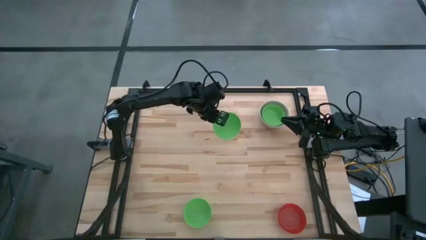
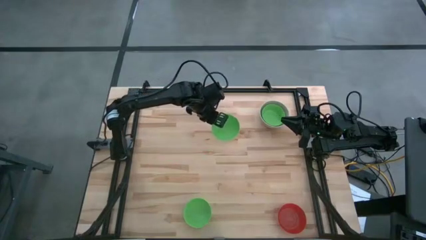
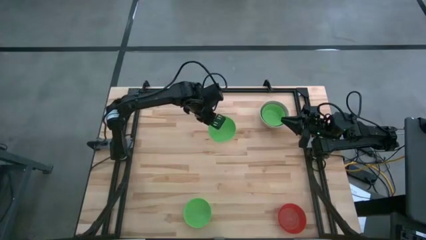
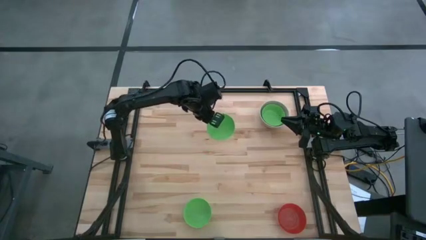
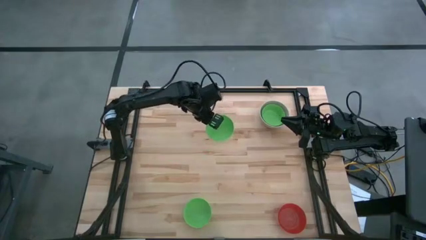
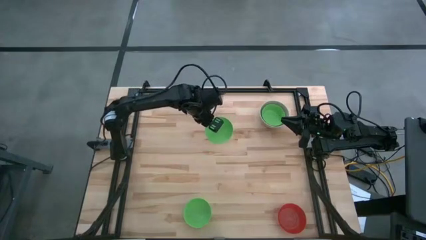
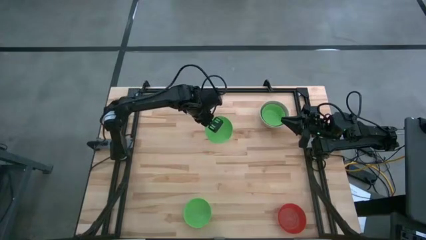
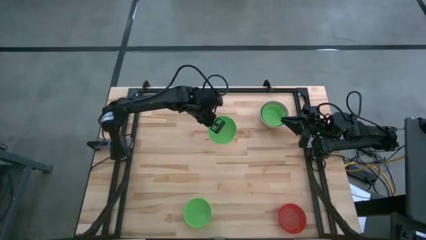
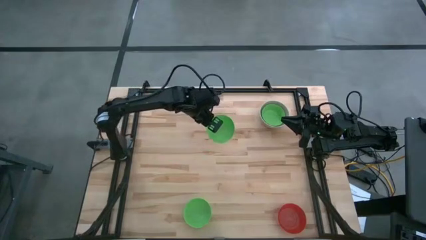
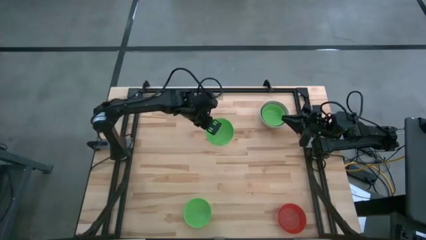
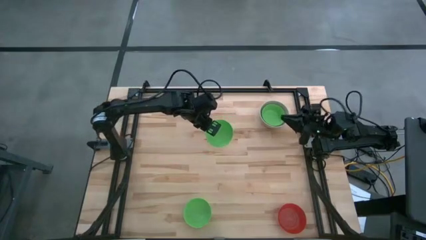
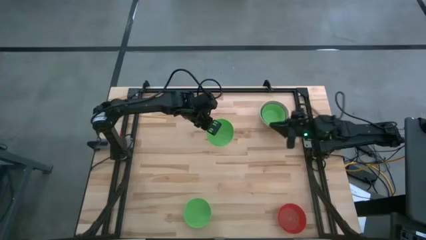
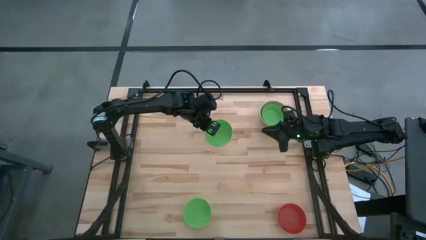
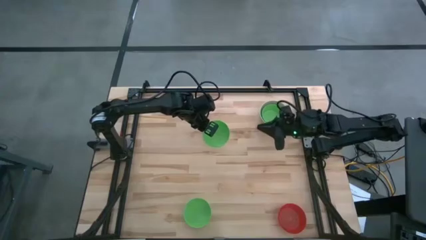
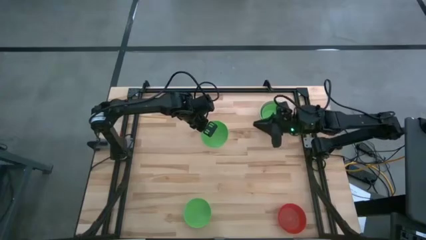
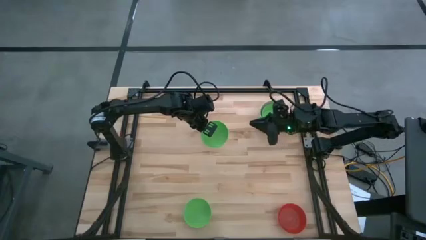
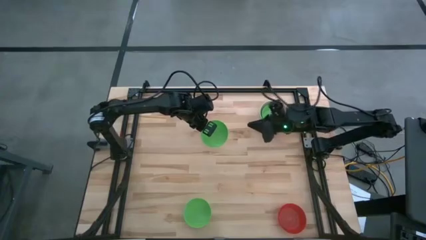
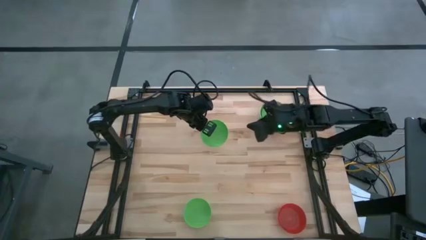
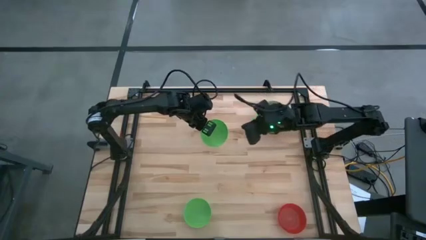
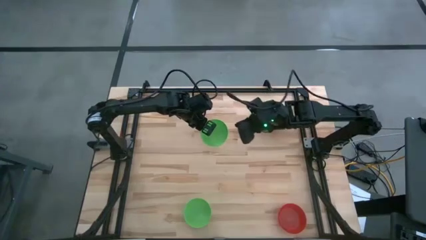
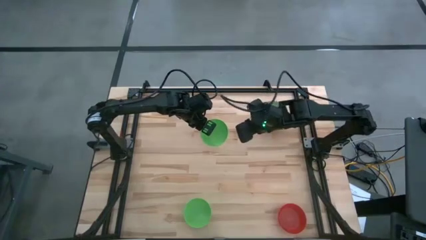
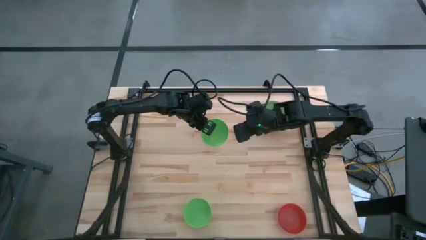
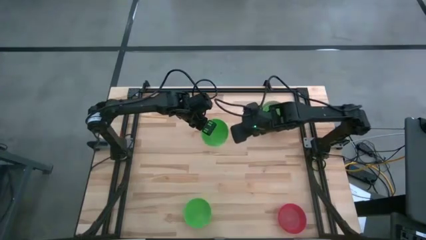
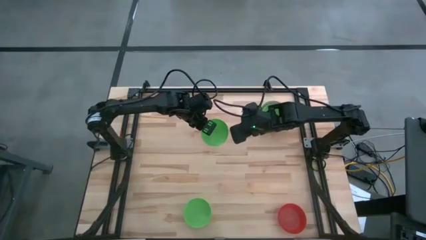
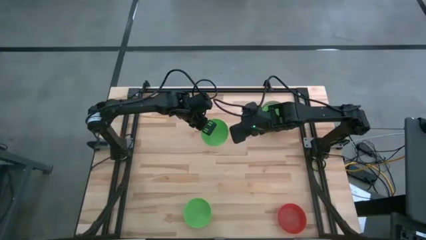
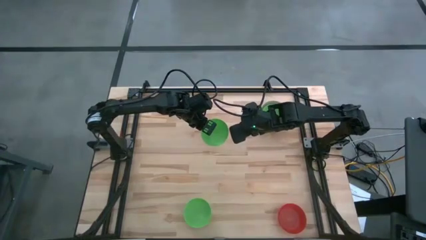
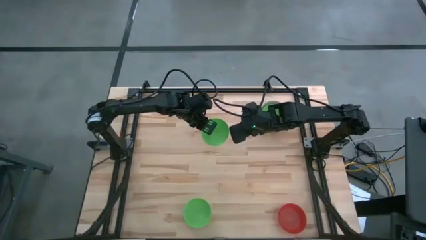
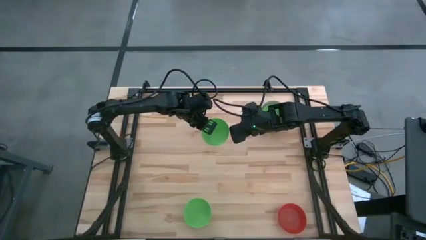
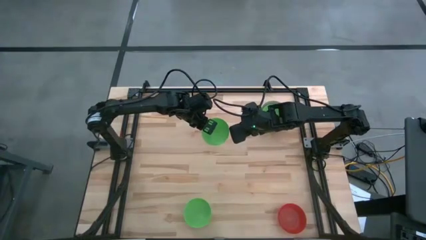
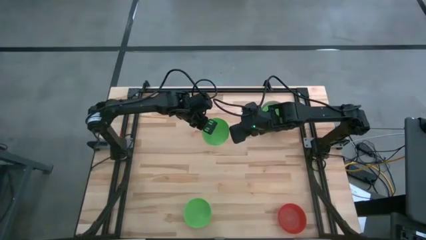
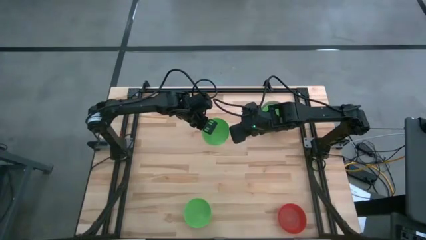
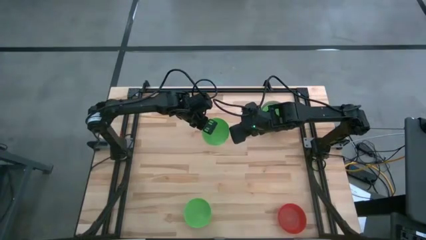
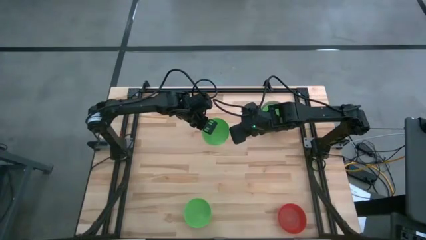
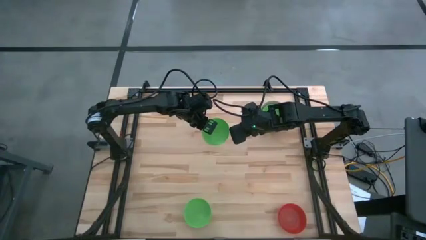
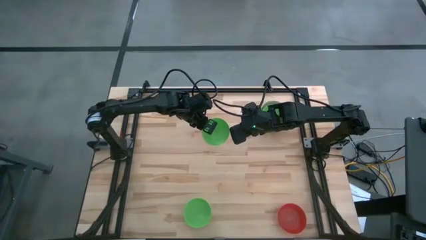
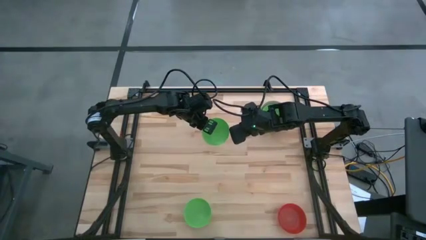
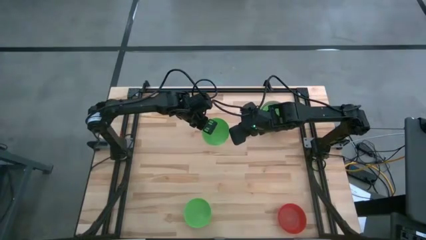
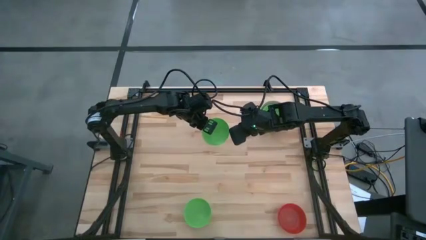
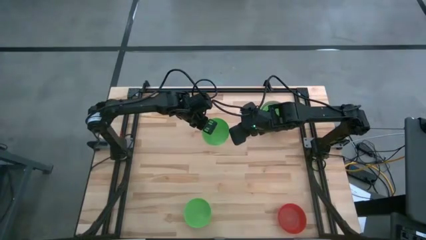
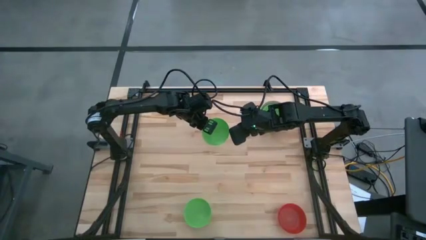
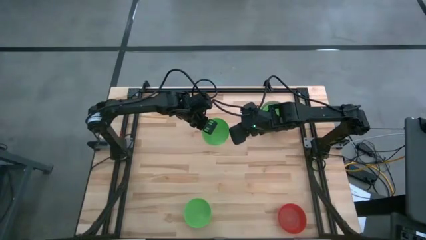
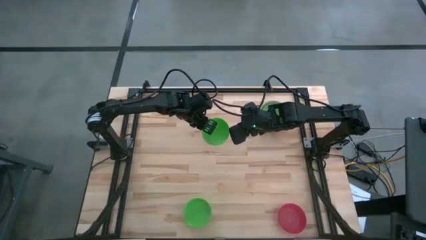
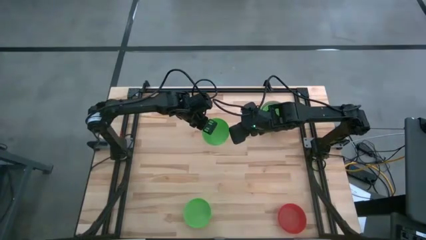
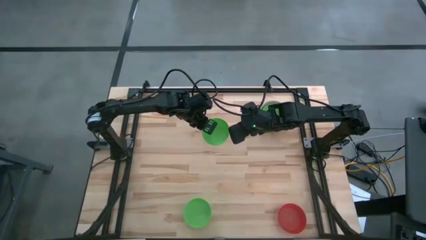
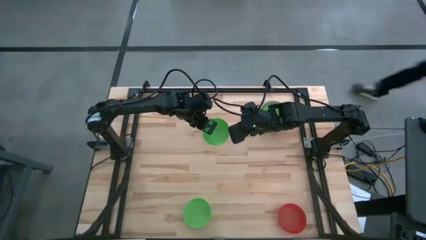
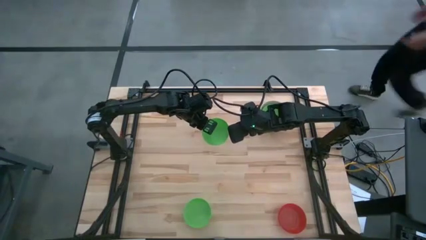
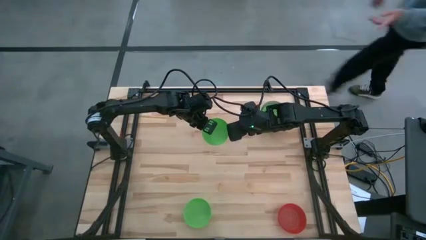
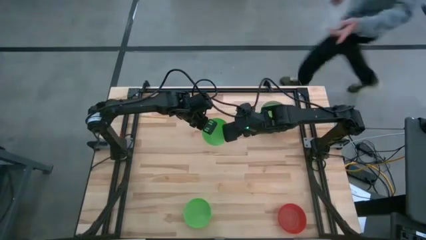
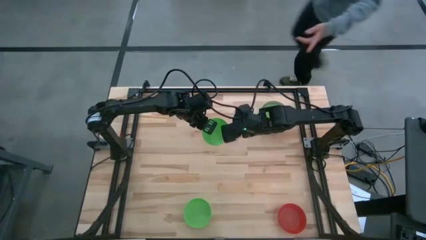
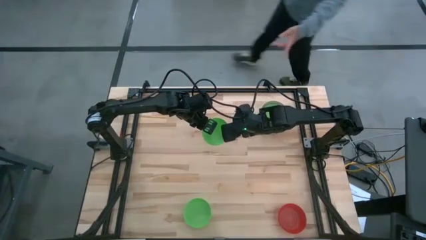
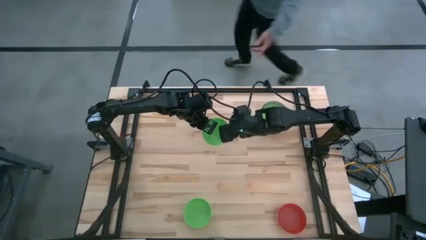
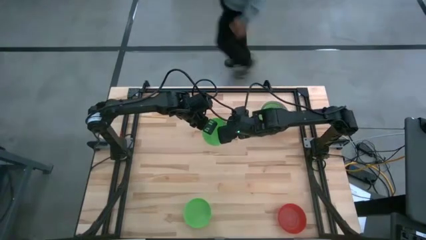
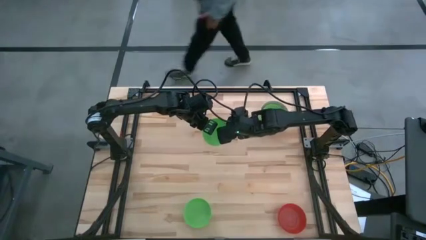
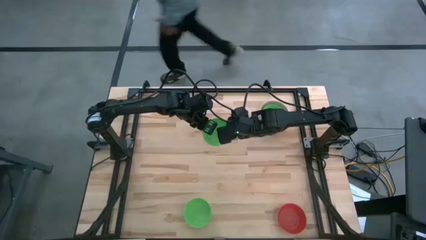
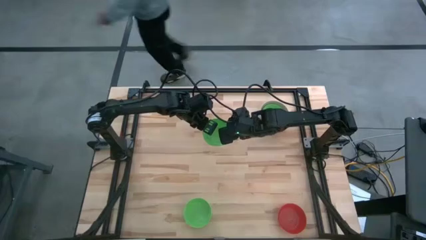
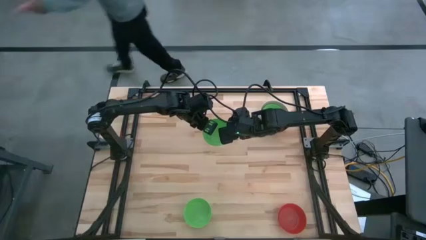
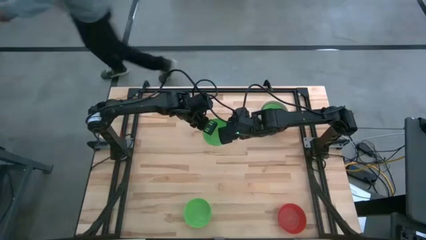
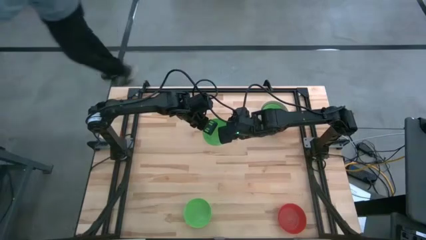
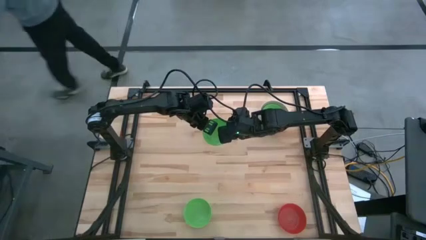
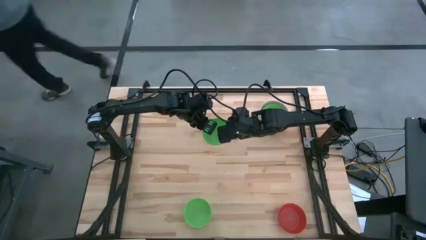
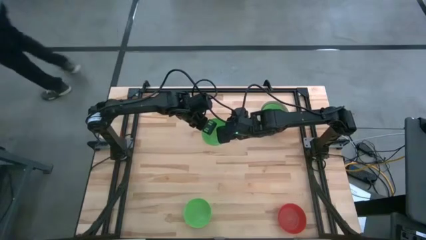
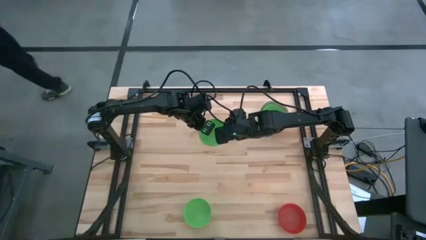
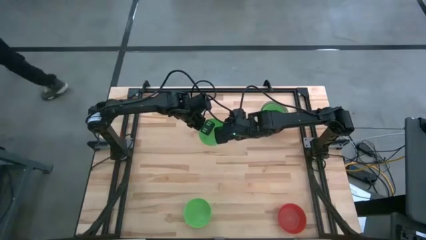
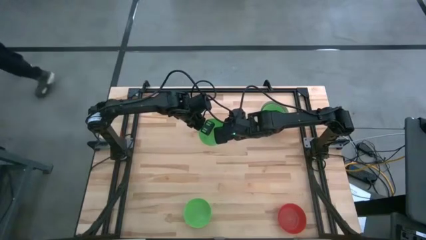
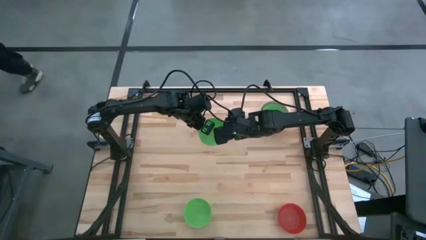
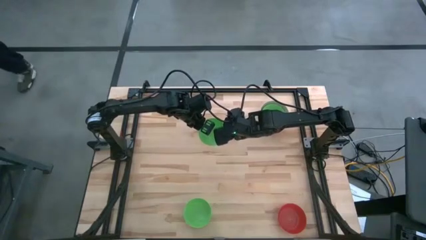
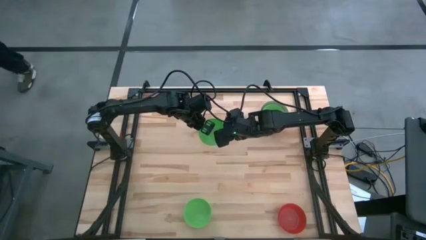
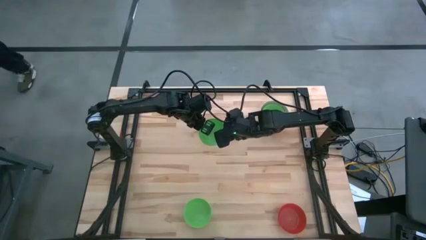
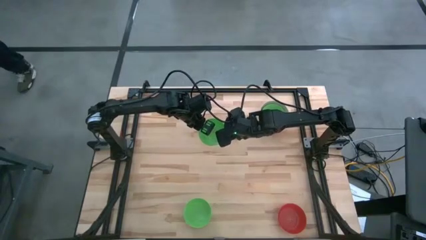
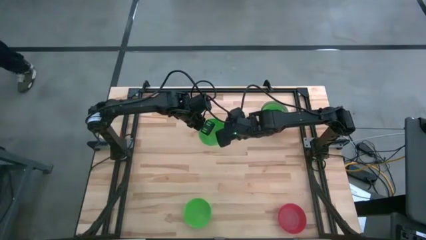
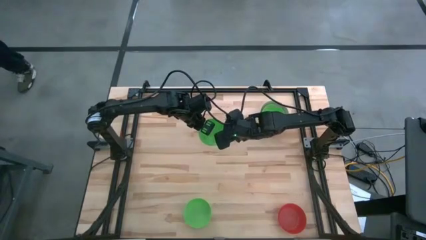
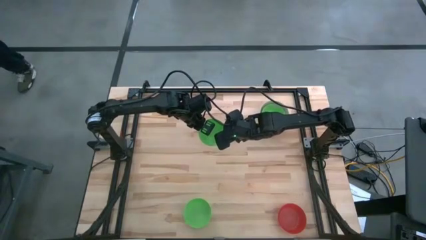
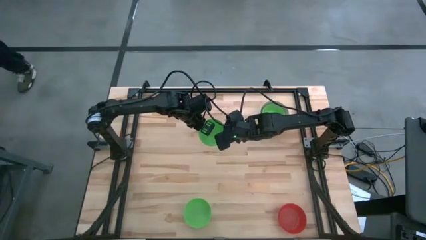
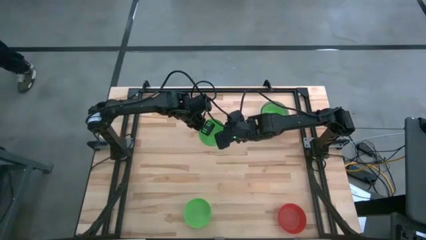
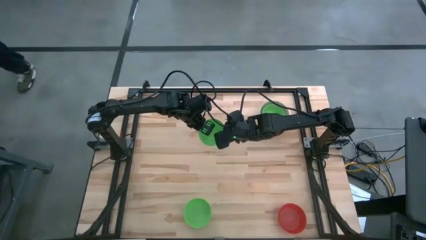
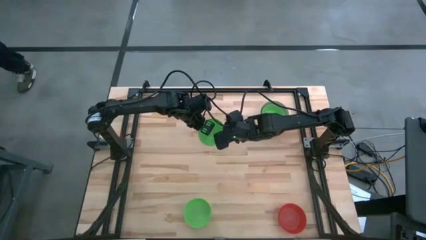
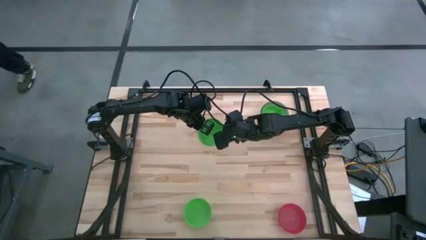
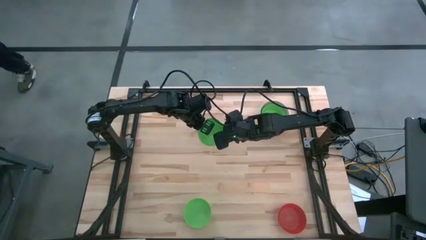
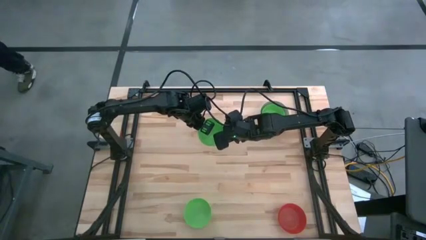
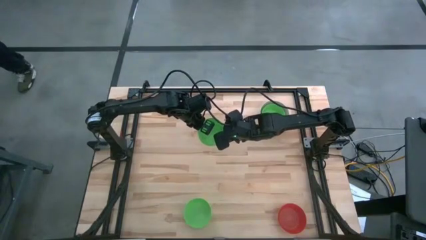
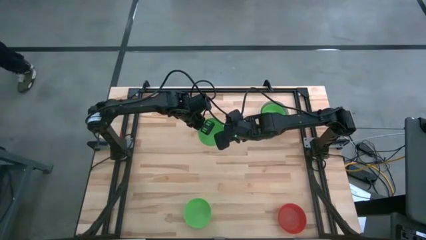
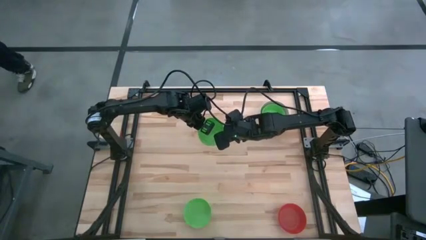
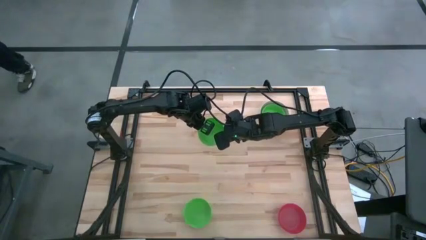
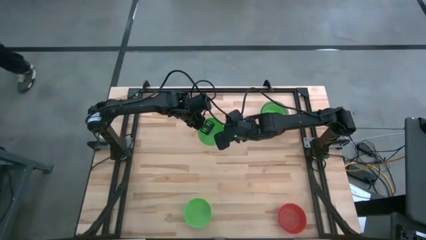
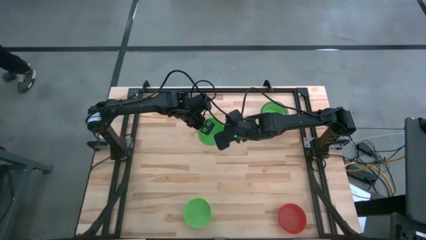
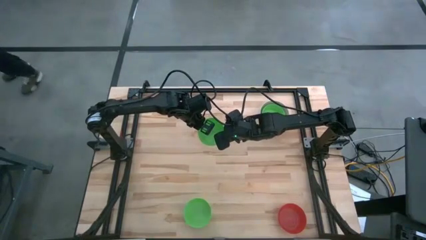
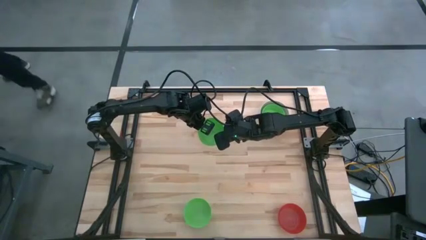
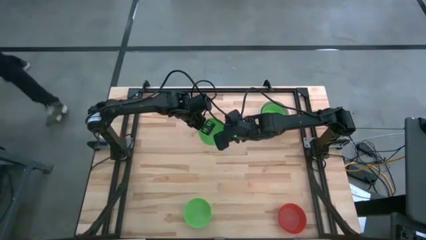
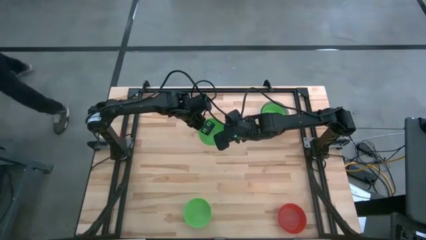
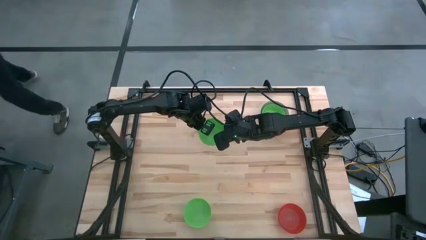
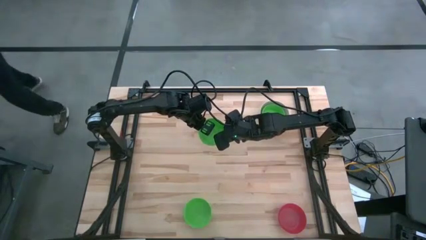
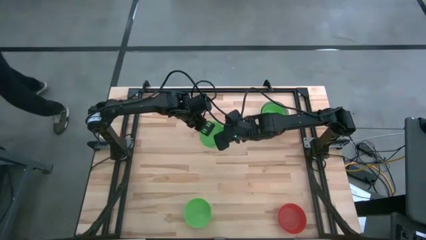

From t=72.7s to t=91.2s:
Stack the top green bowl on top of the green bowl
